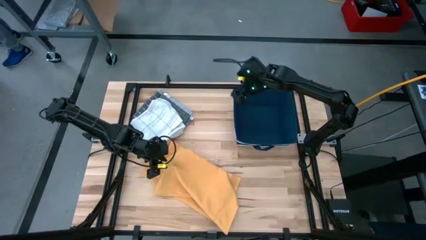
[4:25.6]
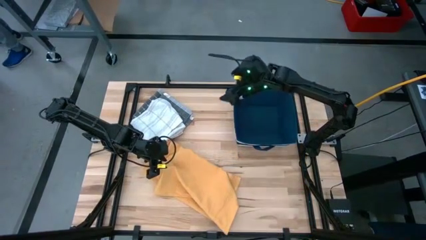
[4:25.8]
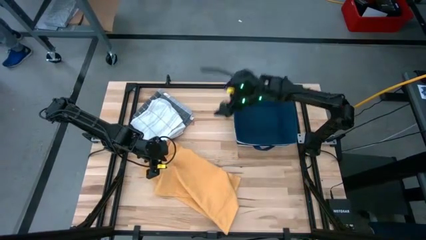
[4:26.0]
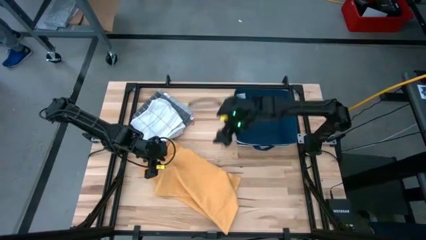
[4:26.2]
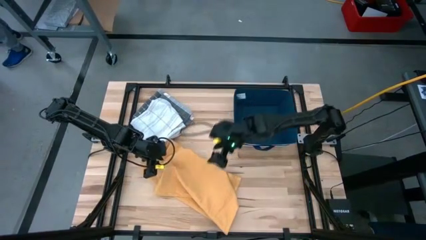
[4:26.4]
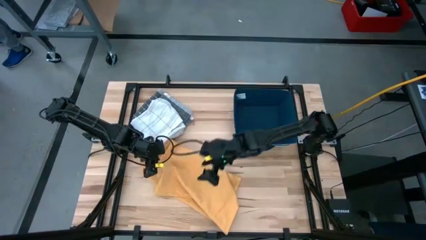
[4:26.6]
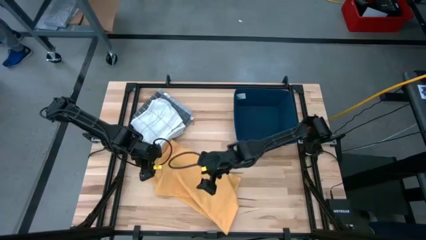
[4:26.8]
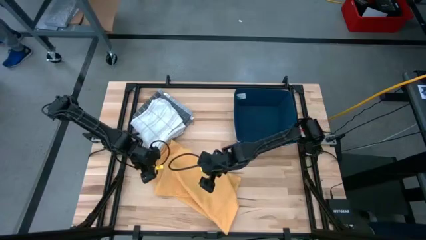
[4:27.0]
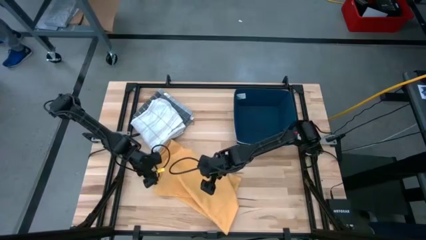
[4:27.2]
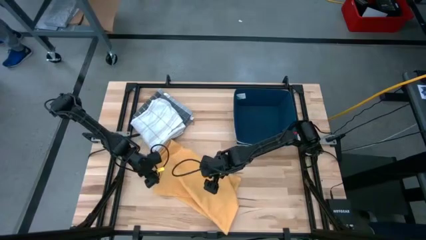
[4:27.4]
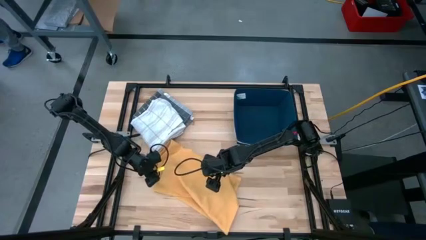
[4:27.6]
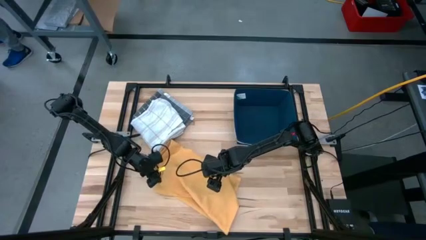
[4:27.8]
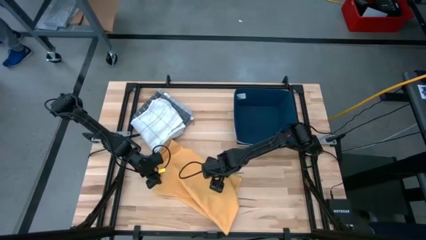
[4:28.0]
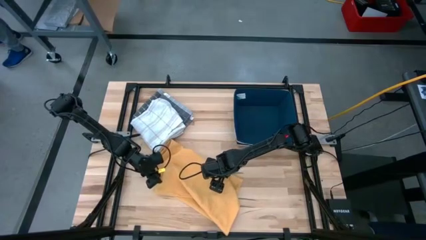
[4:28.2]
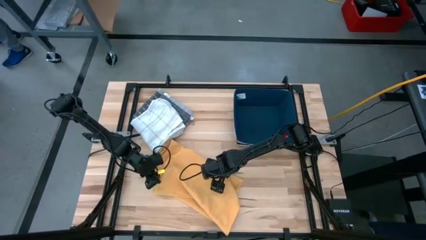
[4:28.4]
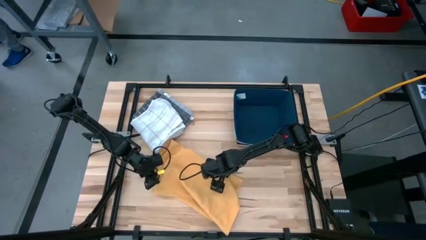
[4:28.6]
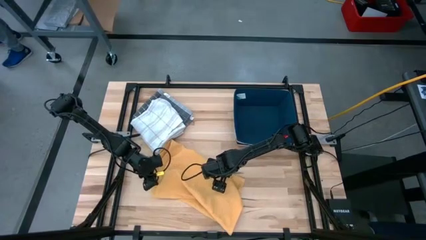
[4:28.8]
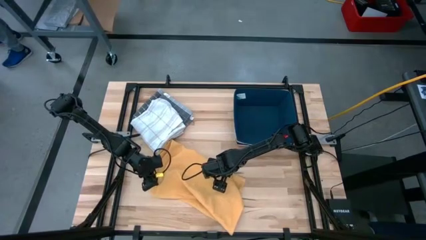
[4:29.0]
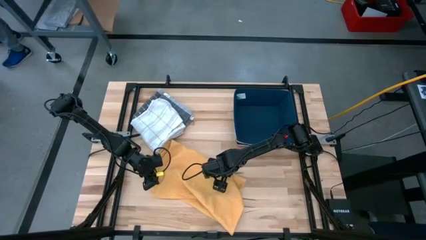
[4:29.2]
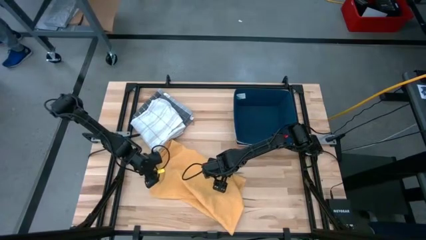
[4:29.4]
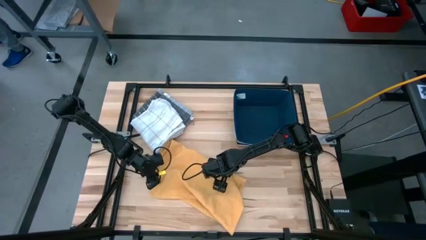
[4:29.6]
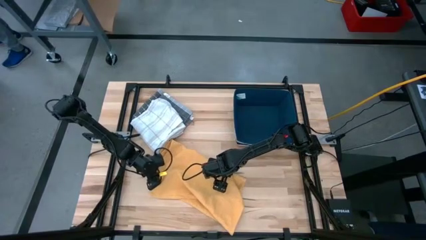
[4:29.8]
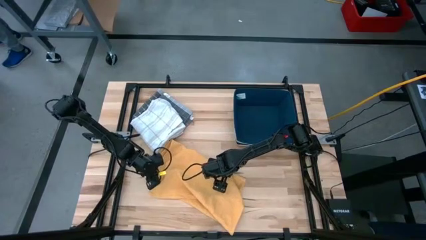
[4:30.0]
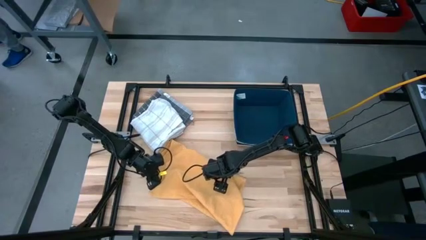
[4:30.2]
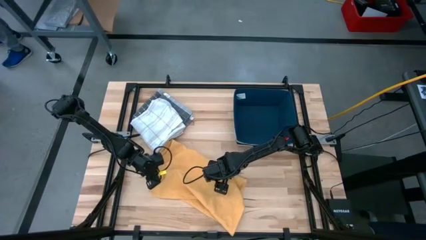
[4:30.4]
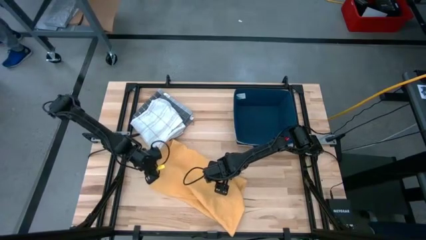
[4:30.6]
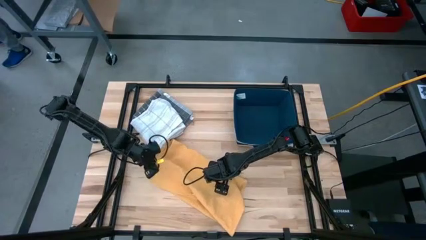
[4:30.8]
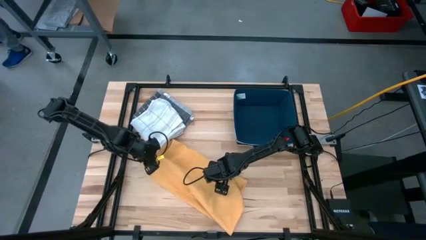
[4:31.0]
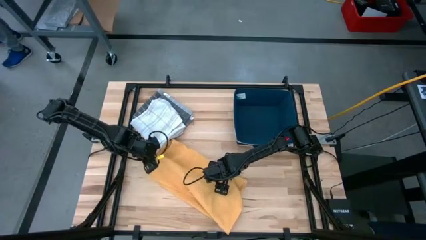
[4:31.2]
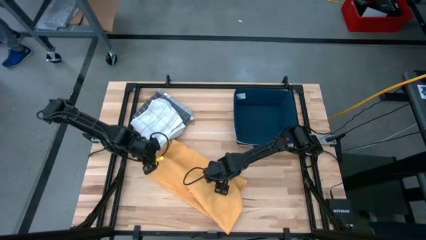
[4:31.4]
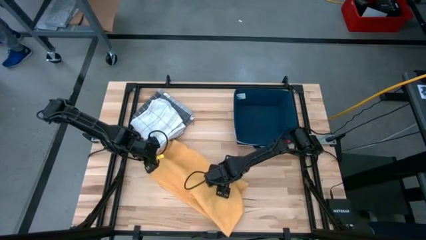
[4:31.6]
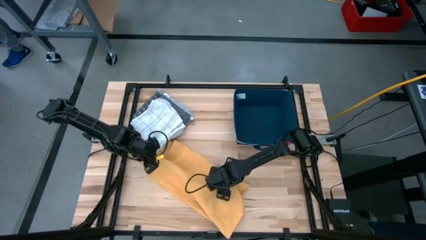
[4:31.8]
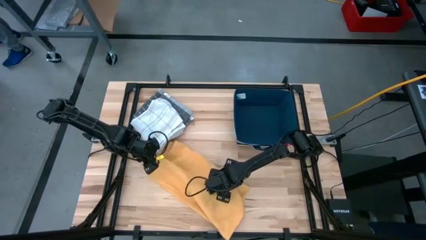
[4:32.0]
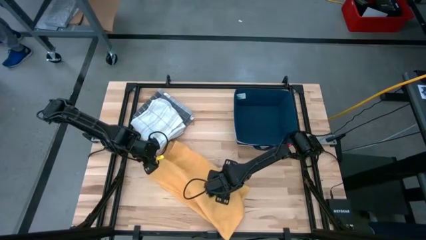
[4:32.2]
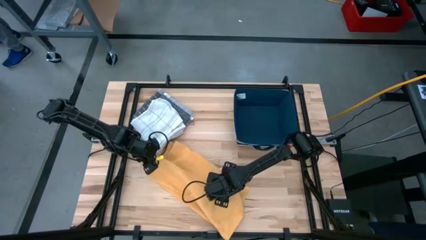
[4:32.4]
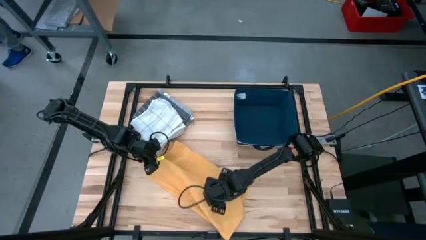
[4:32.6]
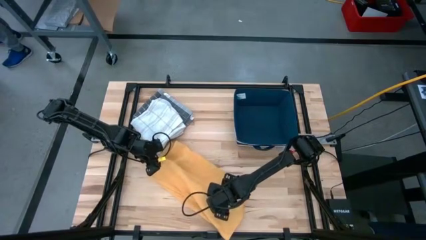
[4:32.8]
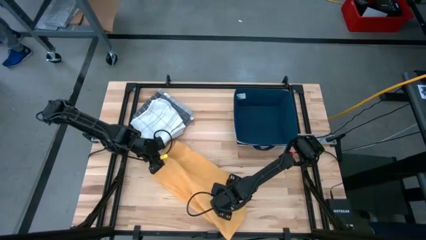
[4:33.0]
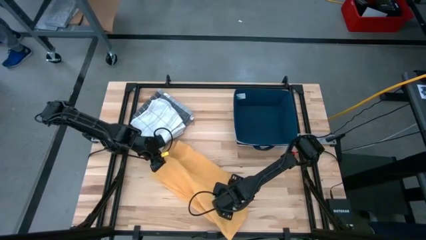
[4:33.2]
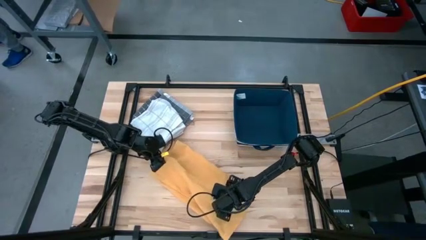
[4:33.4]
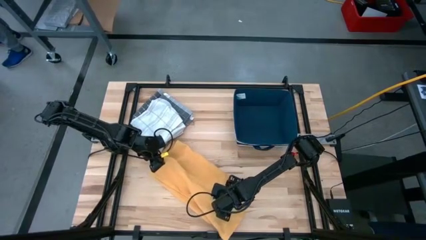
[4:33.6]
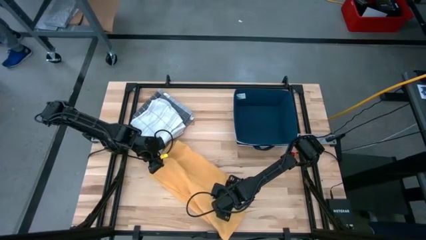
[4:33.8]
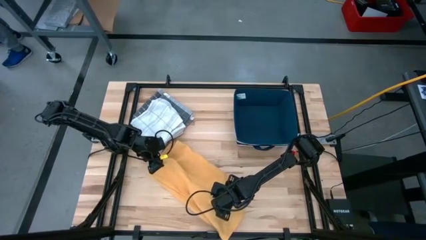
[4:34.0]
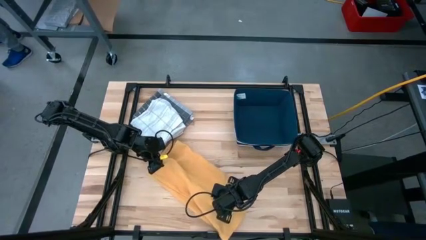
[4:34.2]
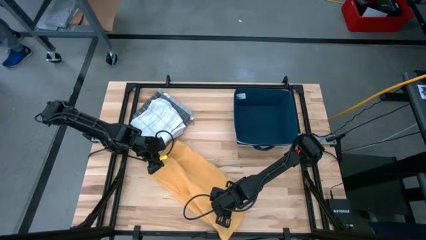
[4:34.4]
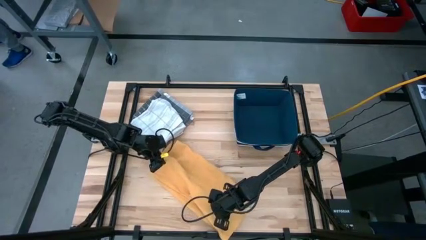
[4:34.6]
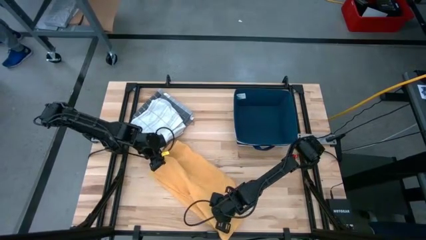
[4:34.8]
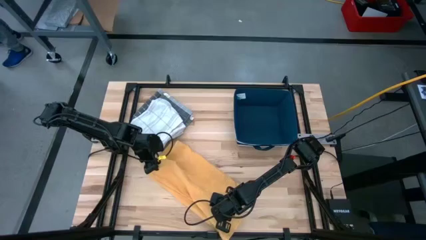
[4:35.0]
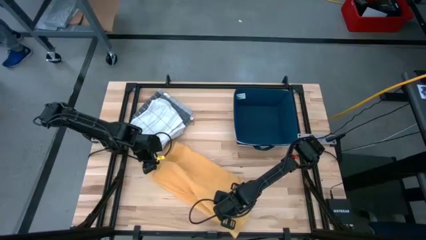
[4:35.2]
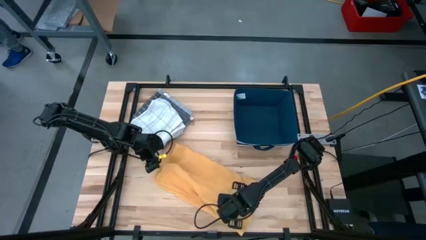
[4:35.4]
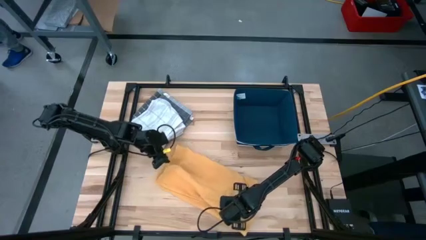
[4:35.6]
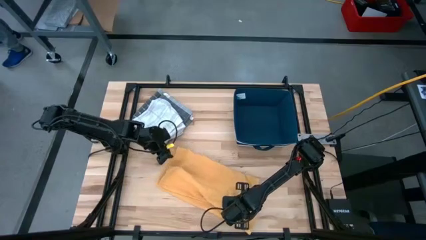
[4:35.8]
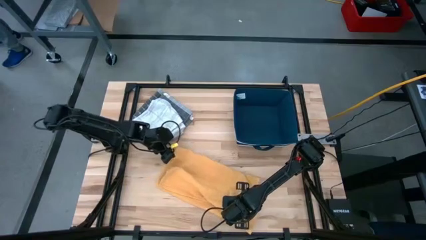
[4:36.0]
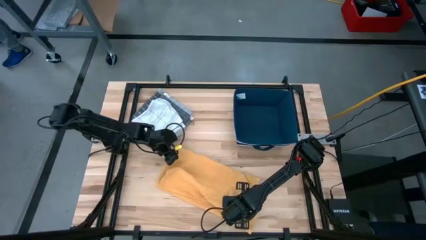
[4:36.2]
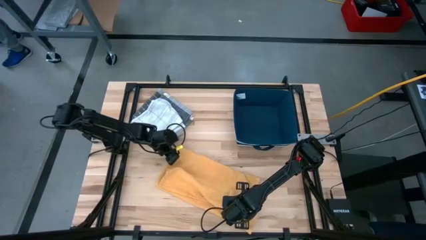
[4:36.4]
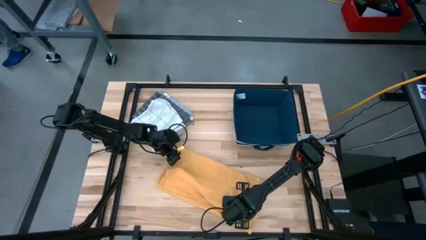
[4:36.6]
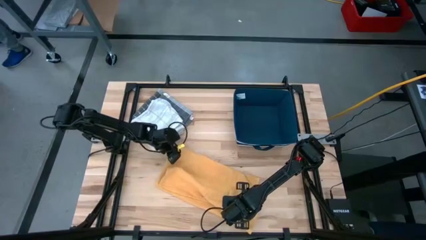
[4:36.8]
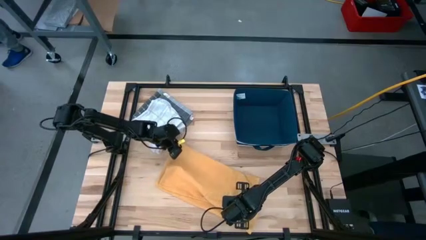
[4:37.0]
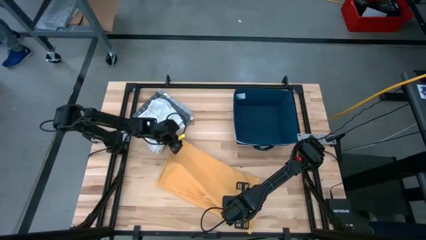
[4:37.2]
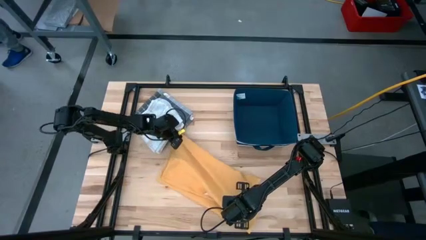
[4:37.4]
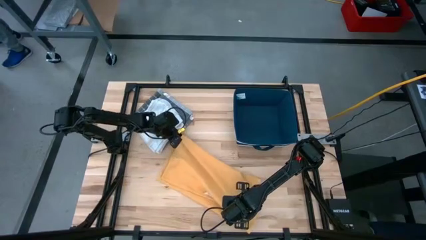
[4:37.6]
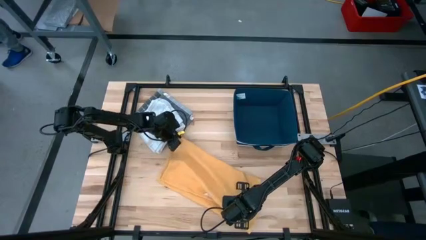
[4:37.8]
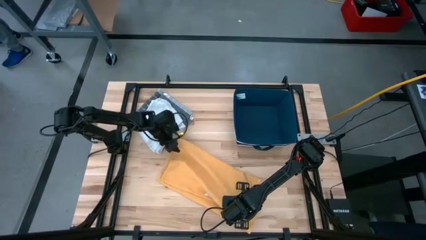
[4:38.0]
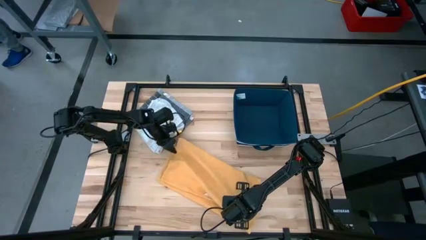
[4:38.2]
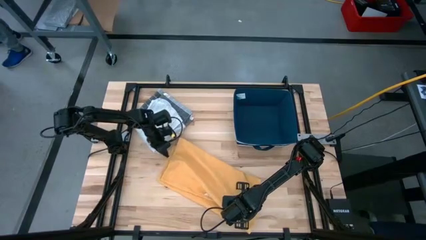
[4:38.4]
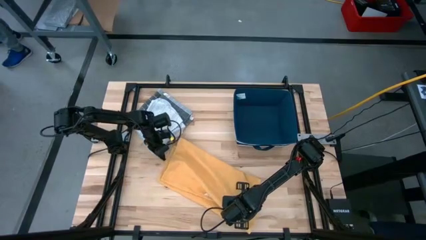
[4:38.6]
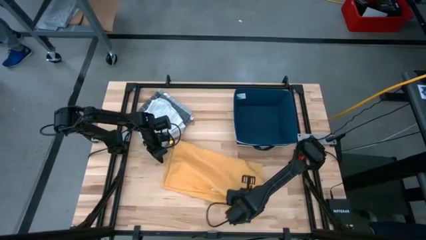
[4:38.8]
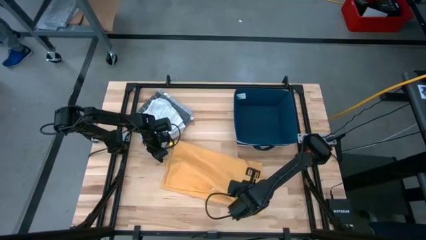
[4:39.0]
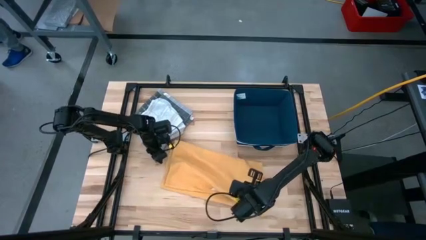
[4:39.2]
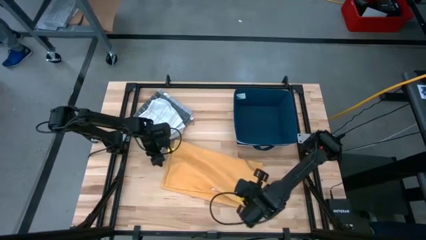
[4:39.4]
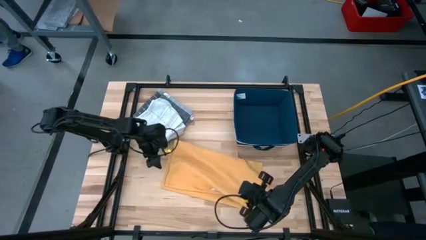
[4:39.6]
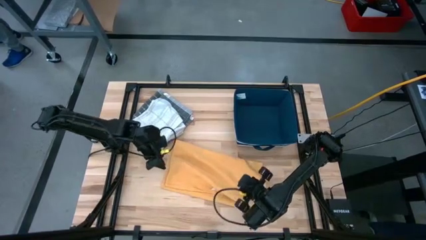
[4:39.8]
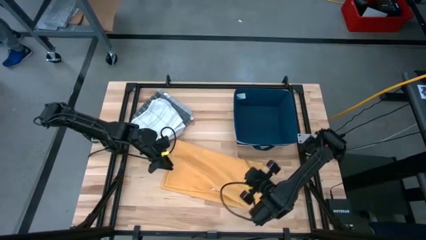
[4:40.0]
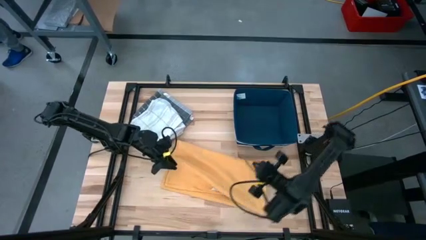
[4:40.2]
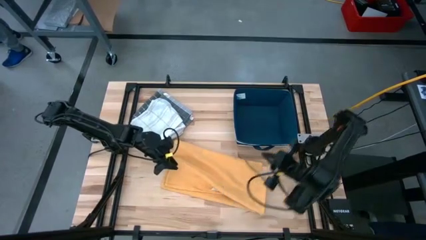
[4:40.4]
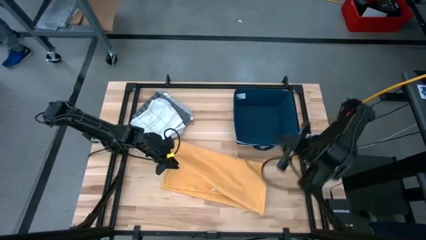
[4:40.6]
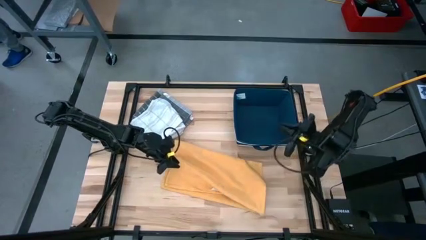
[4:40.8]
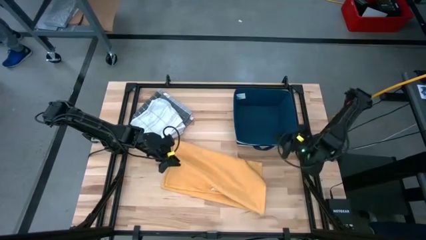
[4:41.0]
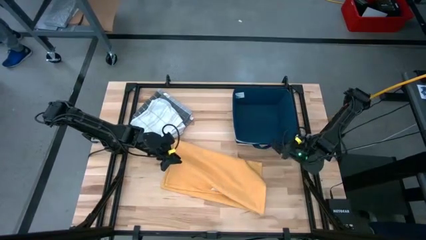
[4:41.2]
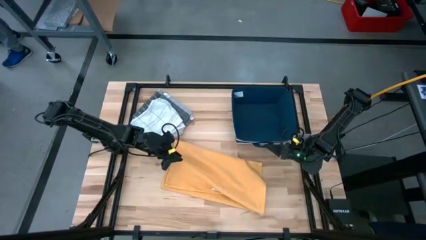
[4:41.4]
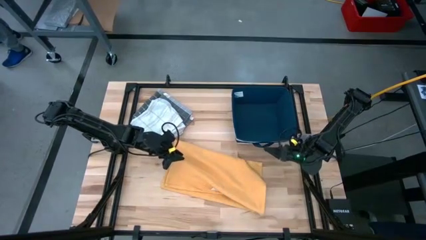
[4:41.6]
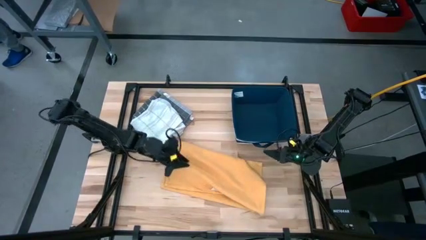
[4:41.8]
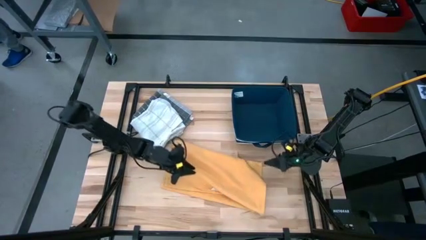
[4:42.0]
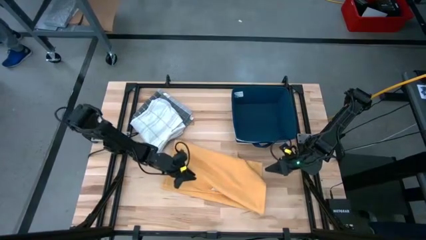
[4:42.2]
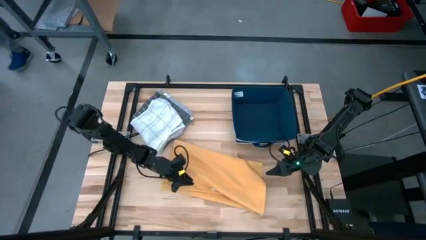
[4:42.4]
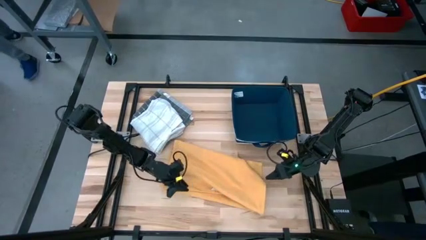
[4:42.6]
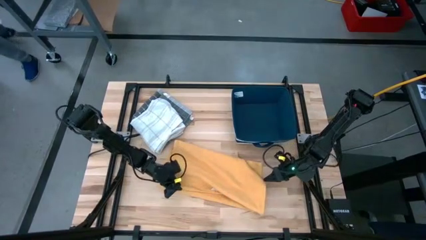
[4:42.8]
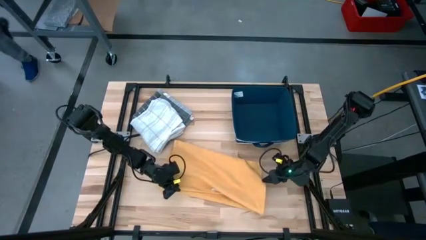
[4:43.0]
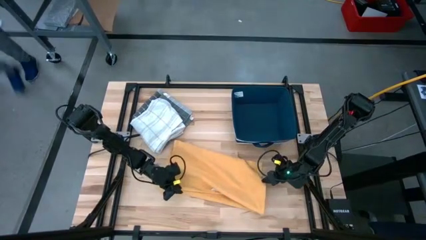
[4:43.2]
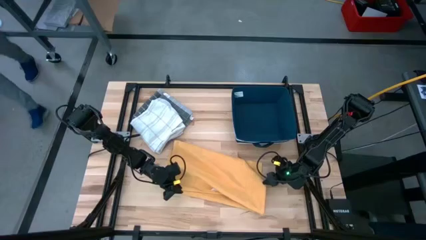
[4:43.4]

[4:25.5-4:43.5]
Task: Fold towel
Fold the yellow towel
